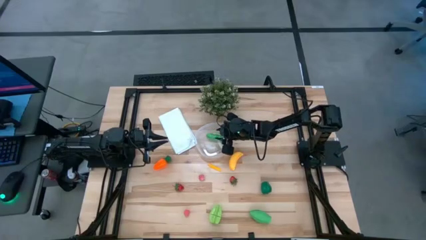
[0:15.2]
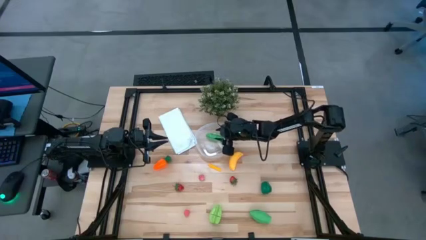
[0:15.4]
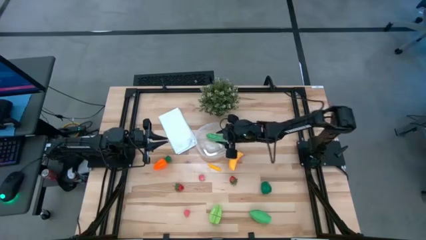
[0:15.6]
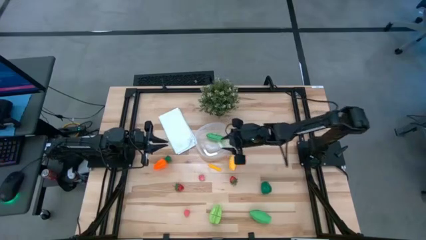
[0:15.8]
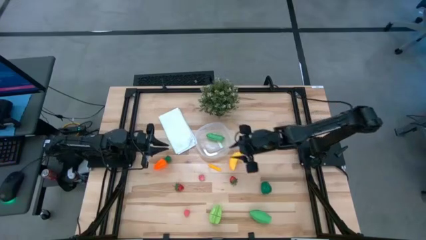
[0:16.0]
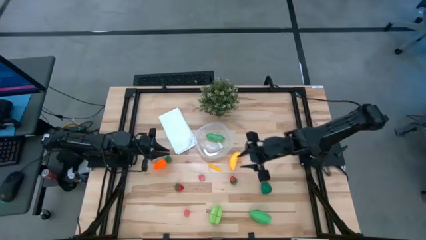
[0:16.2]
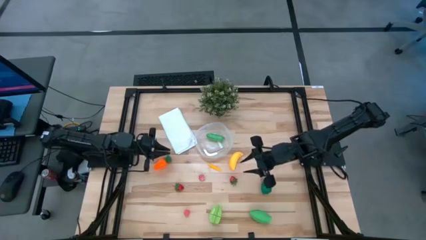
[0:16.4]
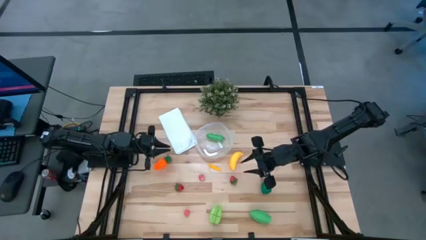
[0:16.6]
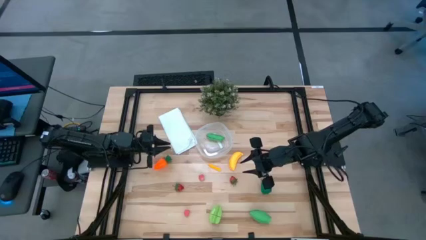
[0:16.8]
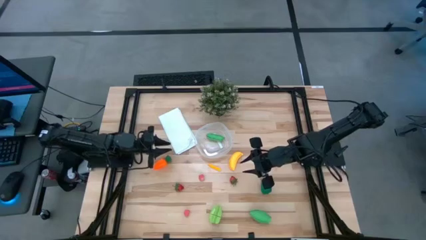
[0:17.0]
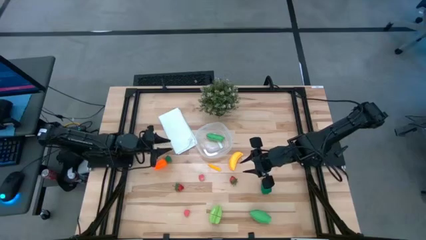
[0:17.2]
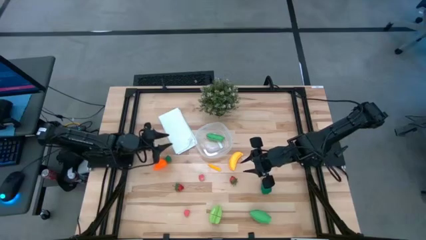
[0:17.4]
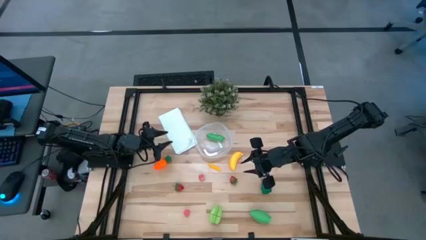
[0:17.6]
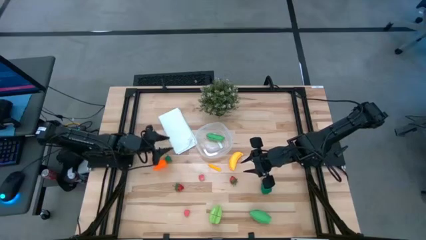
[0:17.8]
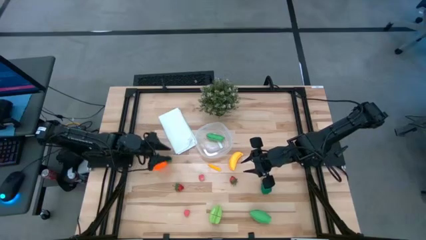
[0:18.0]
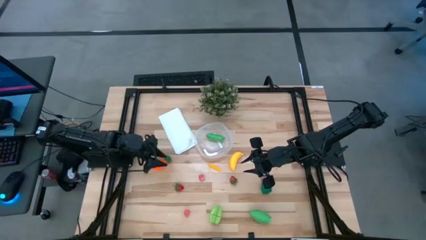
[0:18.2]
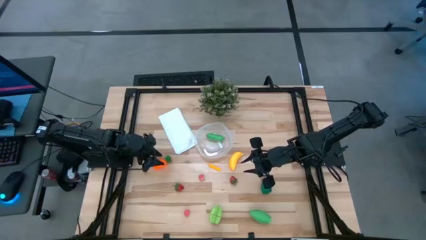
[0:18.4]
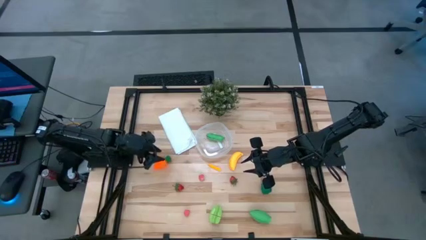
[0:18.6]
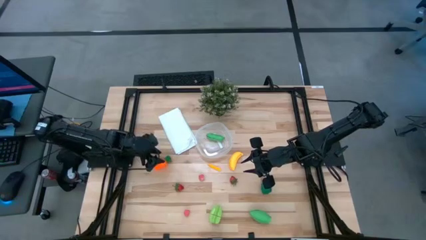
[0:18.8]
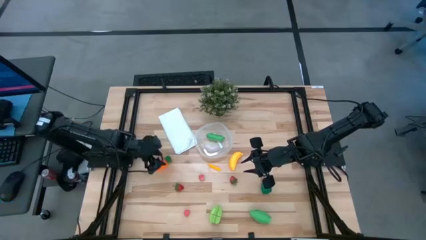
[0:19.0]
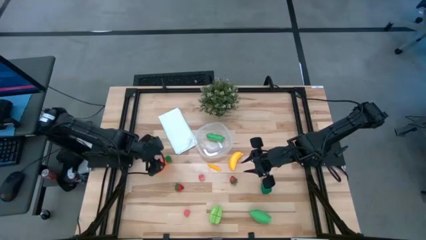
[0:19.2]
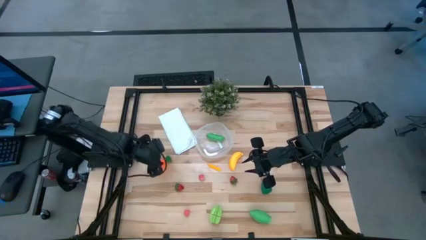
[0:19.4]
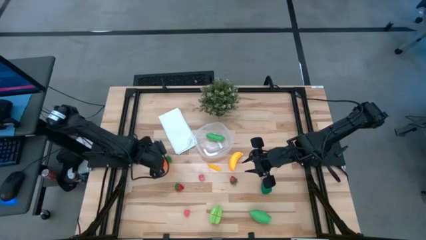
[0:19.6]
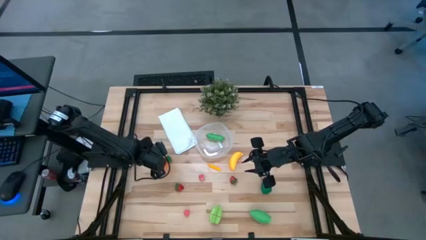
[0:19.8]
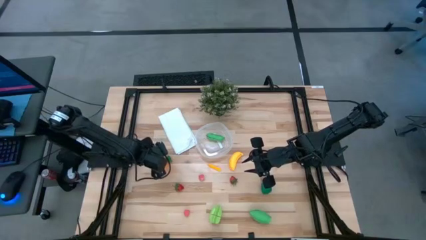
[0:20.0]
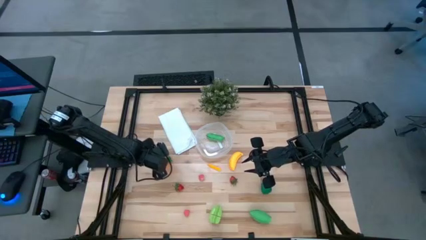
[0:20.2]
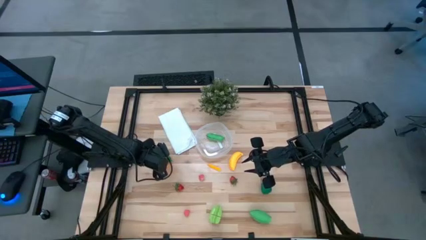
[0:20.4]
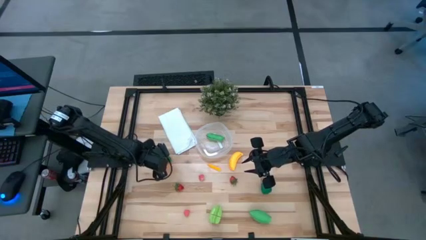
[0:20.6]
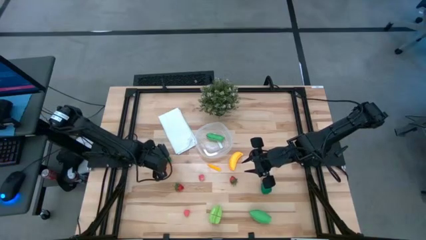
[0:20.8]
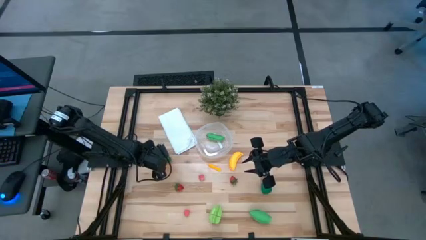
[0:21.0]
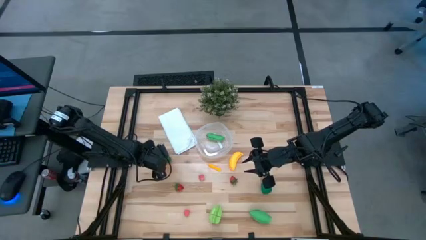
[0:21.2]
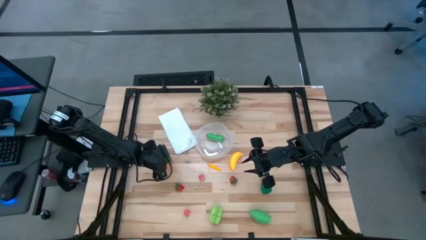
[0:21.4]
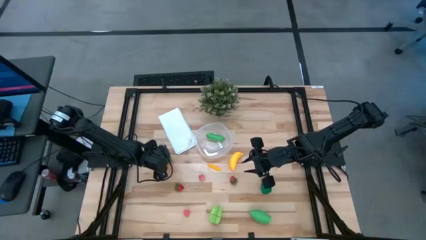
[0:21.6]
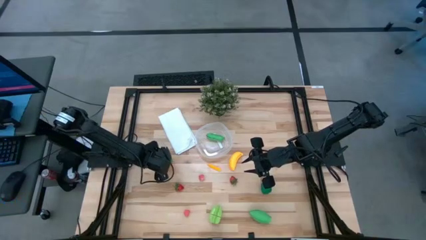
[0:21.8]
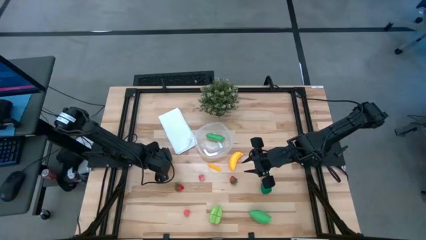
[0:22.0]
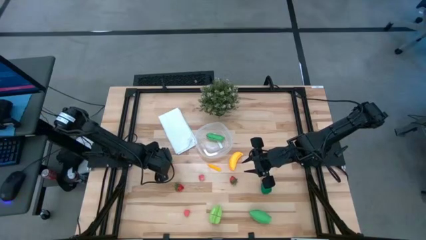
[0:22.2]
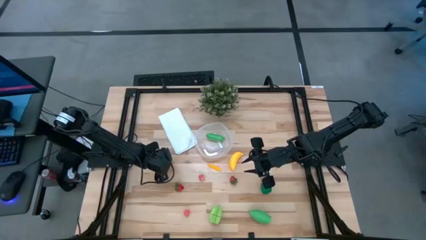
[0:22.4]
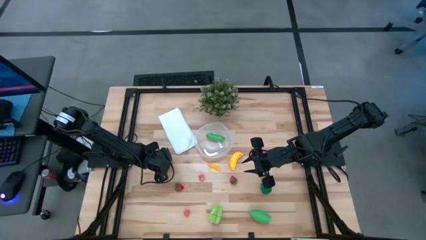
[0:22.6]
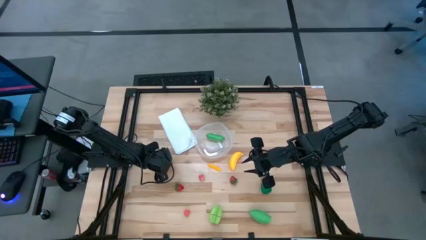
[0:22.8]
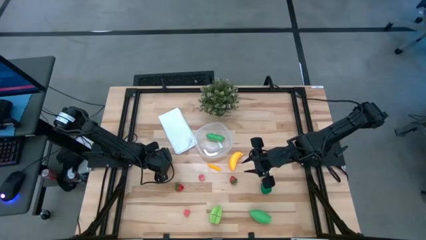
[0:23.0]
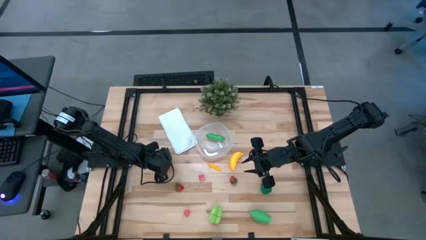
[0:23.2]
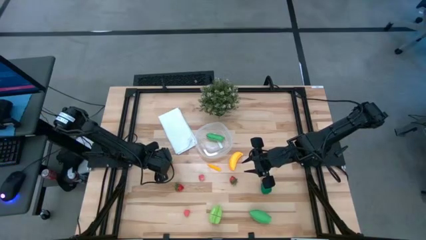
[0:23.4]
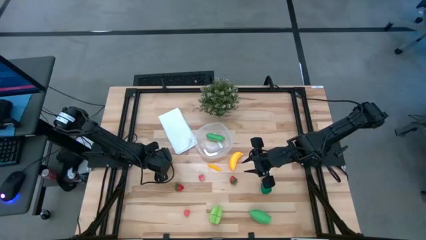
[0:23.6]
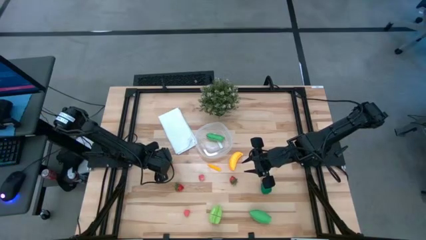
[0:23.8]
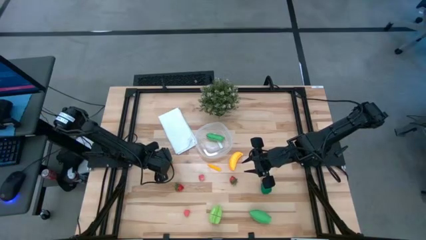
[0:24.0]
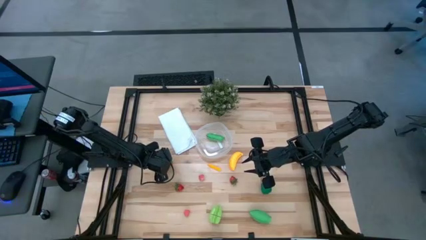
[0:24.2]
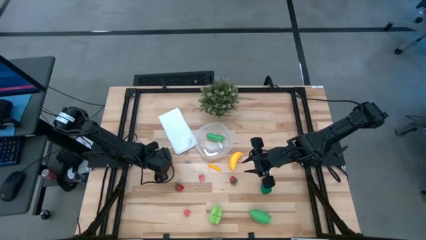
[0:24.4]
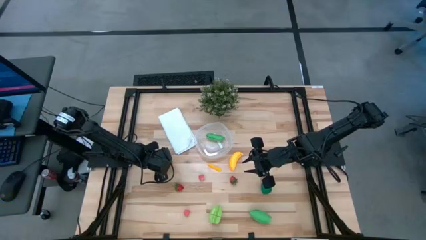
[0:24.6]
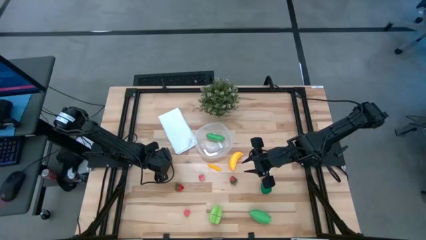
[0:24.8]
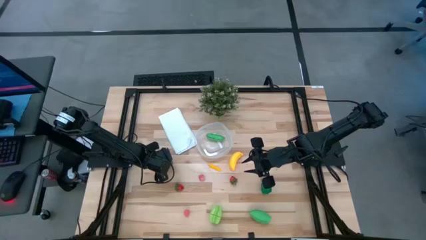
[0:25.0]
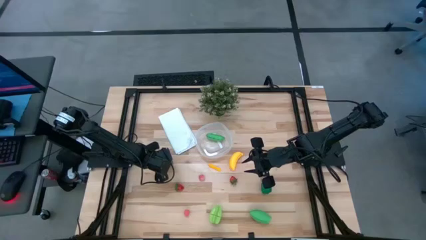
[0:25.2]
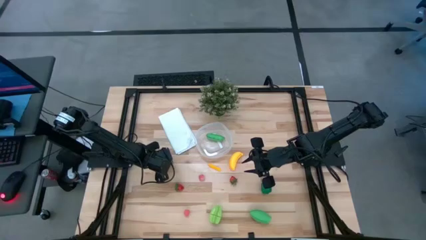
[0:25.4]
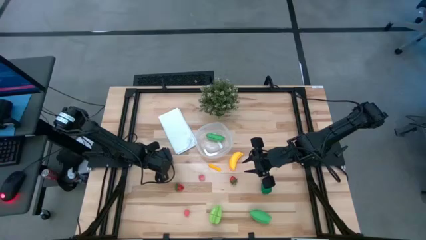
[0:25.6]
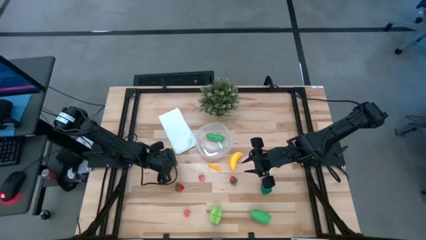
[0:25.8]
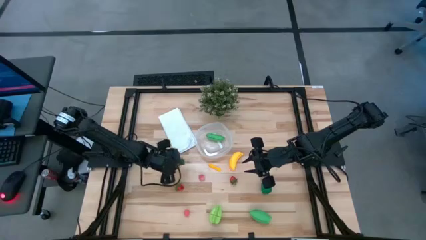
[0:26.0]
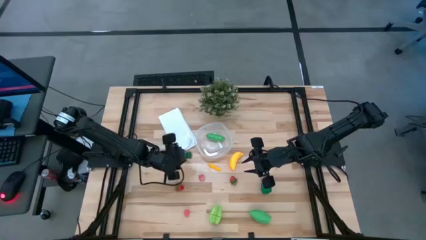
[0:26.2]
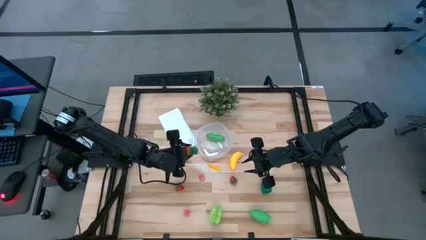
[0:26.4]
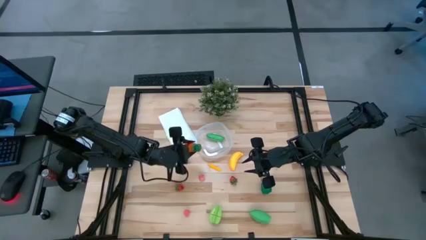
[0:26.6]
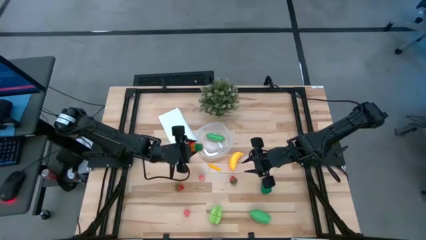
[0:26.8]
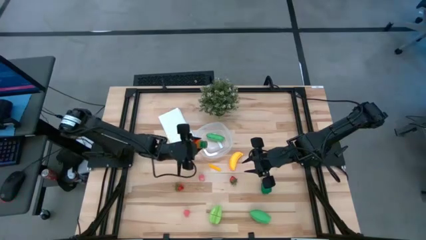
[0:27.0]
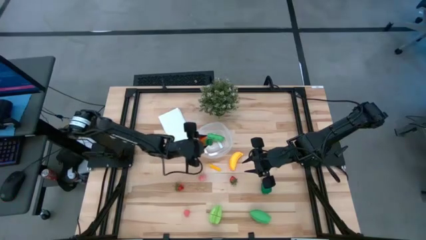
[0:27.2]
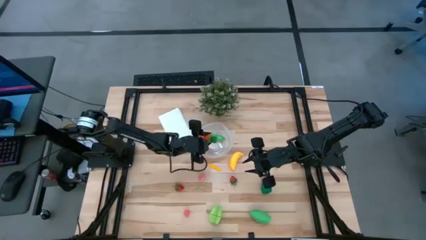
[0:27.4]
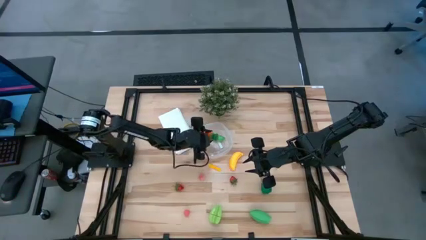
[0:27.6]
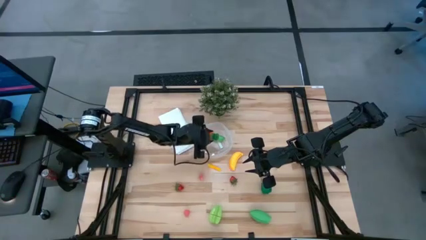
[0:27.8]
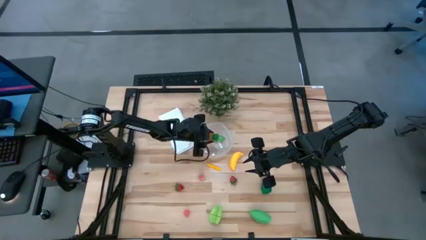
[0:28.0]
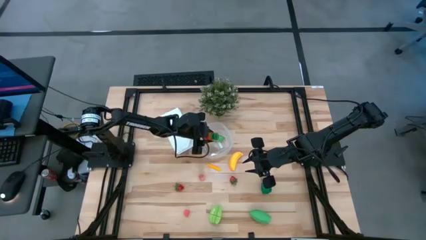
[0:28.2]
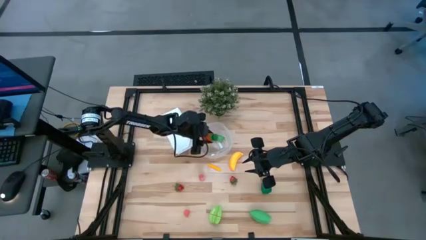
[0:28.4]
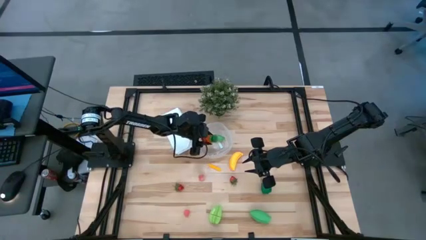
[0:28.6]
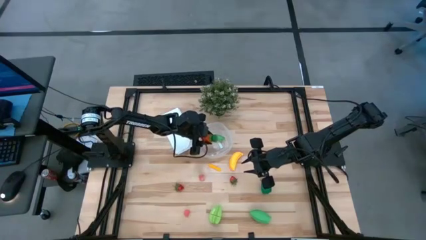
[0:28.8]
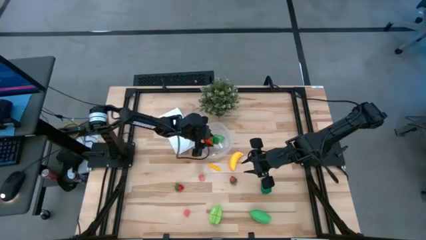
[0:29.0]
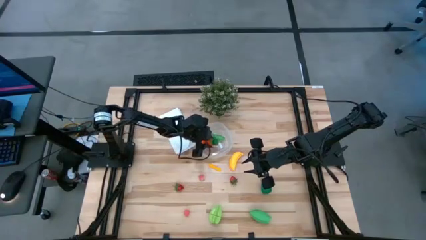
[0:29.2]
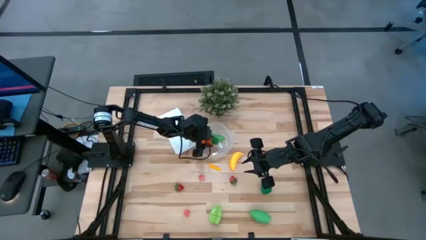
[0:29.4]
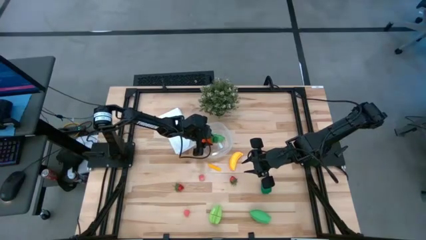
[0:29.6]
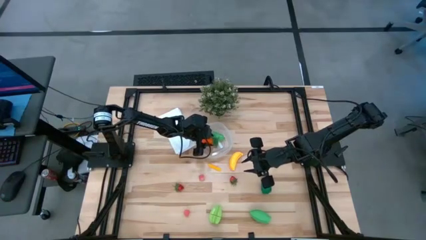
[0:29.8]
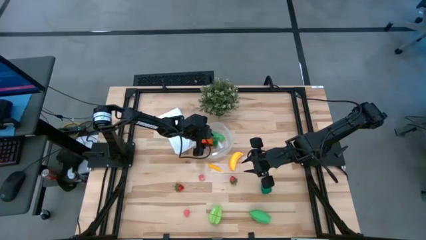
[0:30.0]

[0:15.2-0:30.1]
Task: Pick and placing Produce into tupperware
Put the orange carrot into the transparent bin
